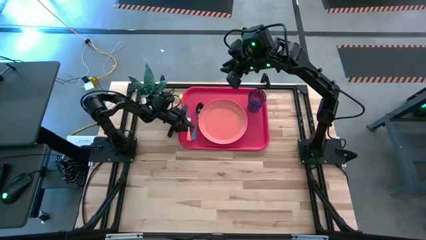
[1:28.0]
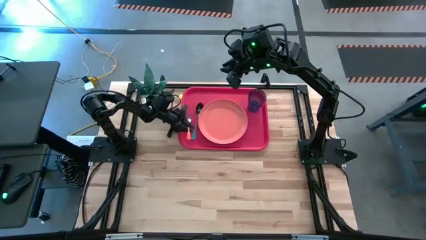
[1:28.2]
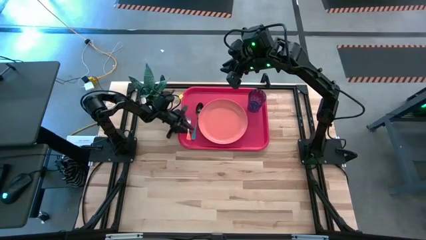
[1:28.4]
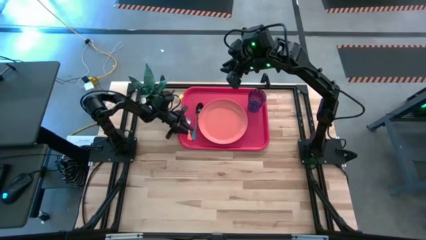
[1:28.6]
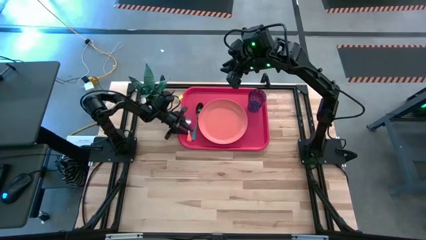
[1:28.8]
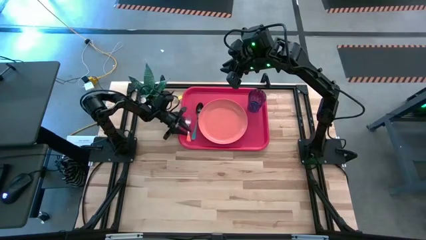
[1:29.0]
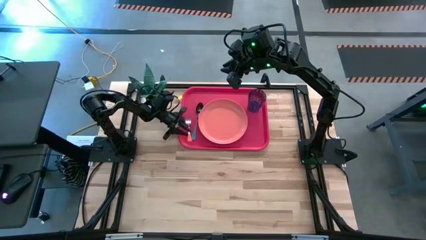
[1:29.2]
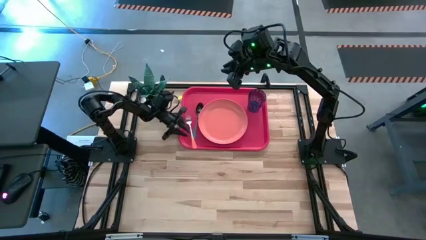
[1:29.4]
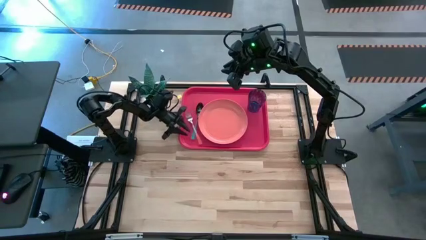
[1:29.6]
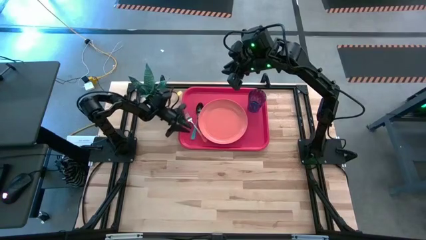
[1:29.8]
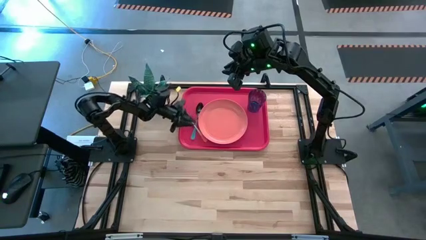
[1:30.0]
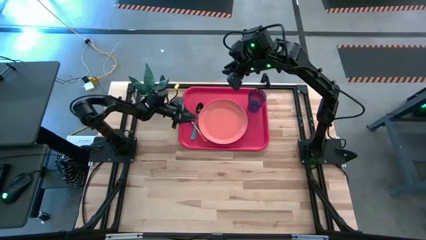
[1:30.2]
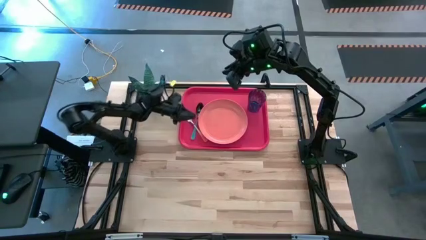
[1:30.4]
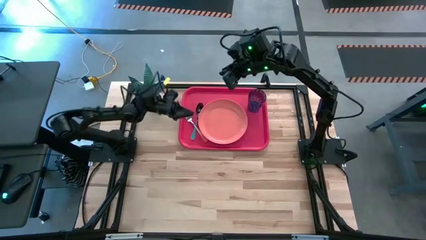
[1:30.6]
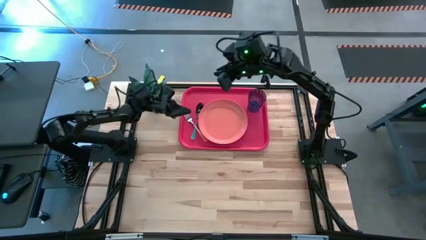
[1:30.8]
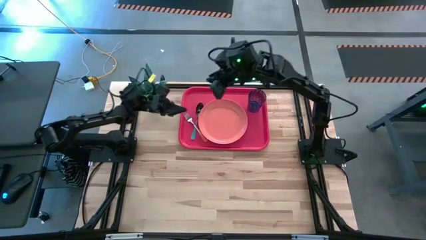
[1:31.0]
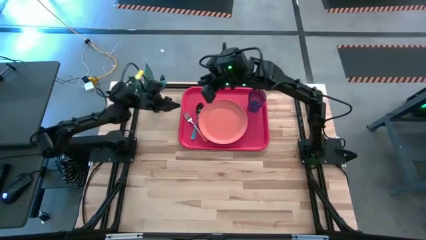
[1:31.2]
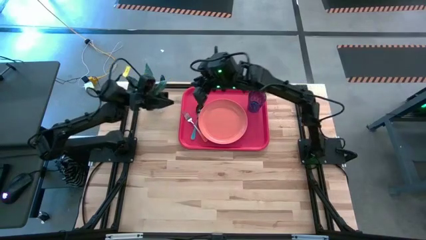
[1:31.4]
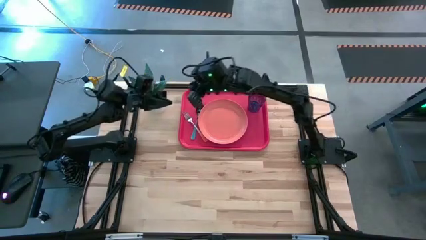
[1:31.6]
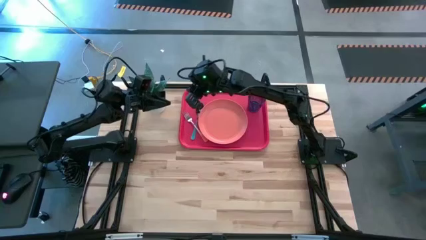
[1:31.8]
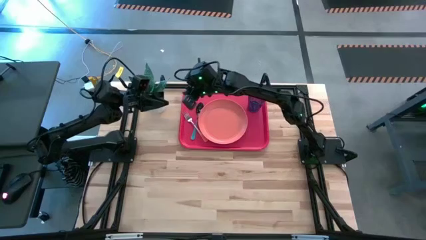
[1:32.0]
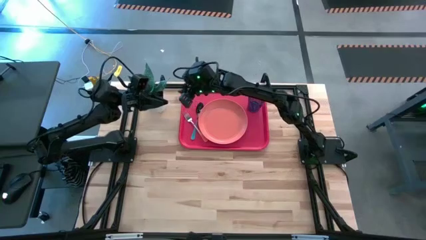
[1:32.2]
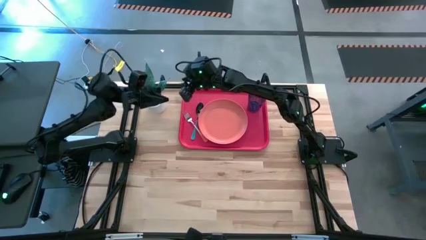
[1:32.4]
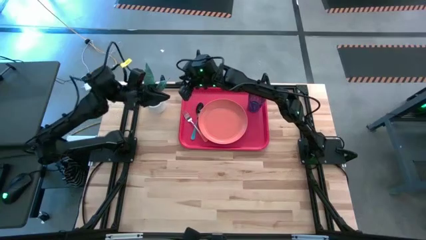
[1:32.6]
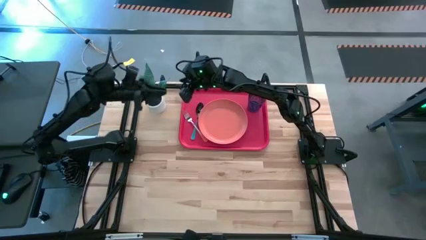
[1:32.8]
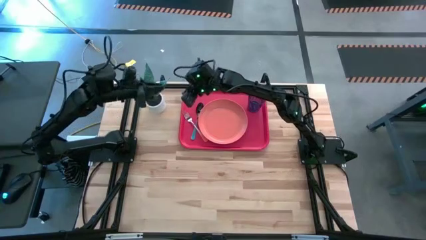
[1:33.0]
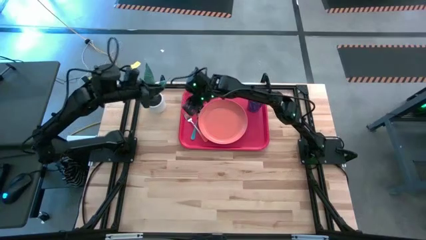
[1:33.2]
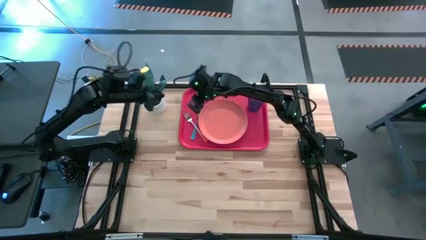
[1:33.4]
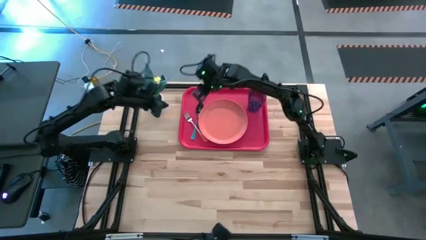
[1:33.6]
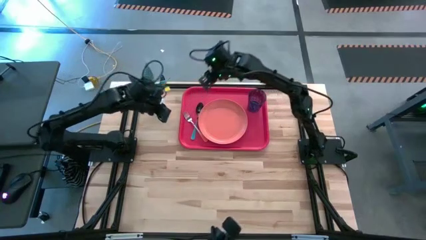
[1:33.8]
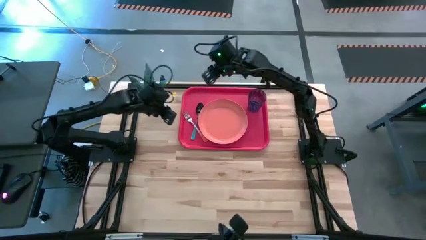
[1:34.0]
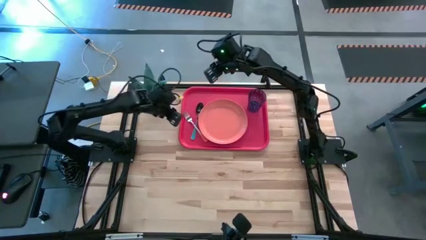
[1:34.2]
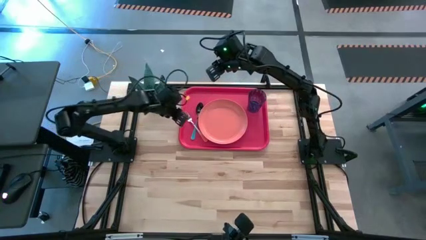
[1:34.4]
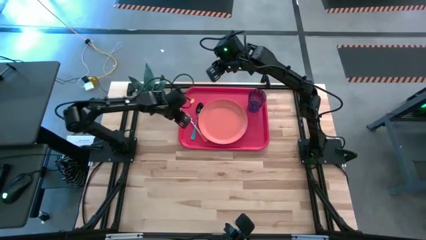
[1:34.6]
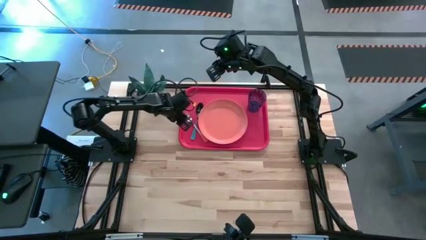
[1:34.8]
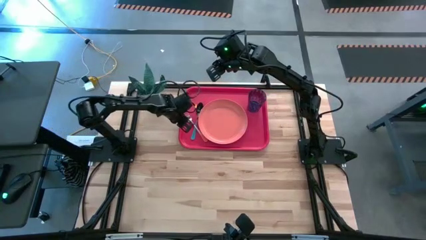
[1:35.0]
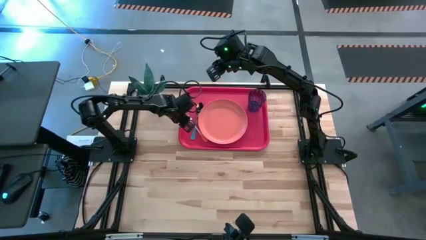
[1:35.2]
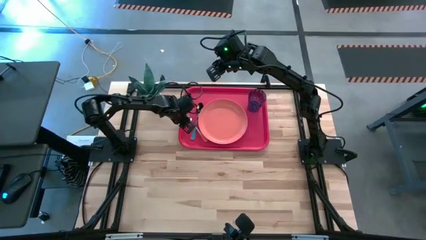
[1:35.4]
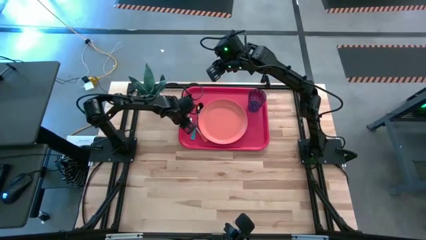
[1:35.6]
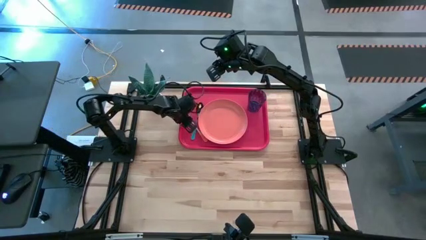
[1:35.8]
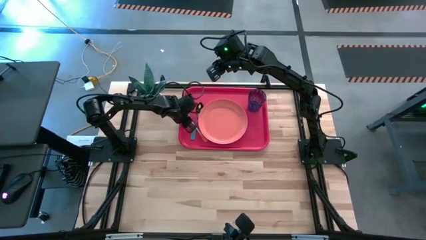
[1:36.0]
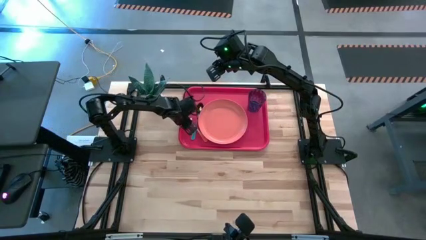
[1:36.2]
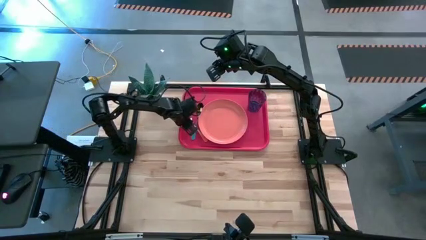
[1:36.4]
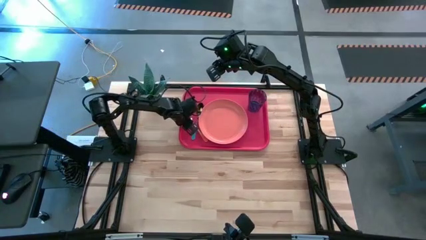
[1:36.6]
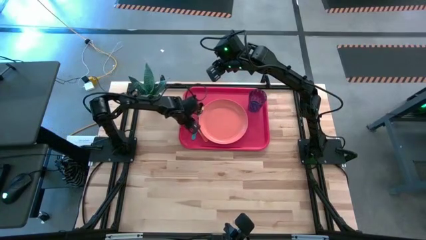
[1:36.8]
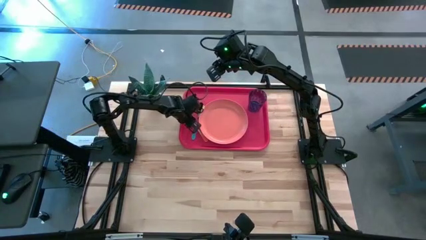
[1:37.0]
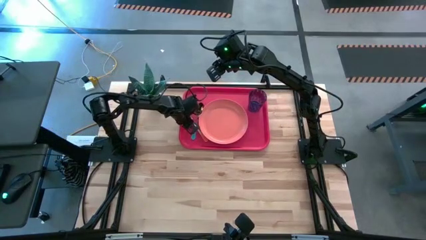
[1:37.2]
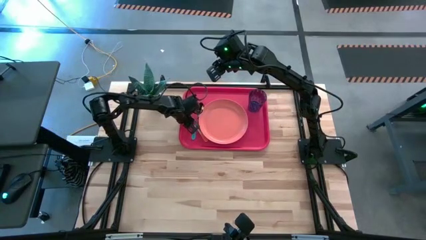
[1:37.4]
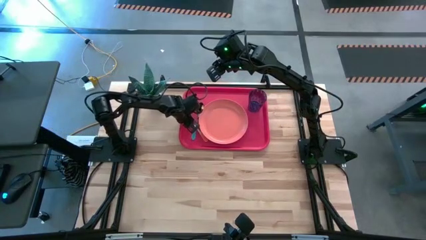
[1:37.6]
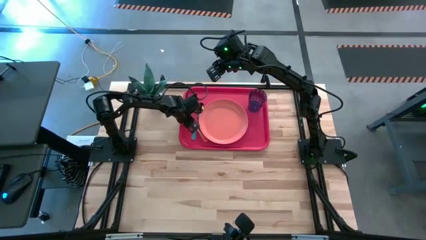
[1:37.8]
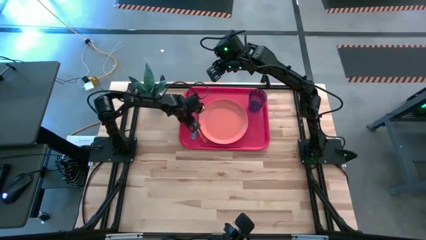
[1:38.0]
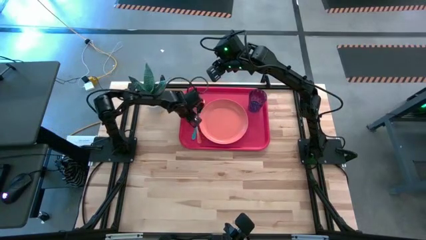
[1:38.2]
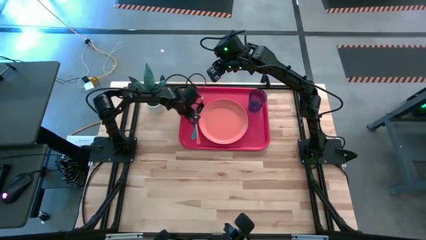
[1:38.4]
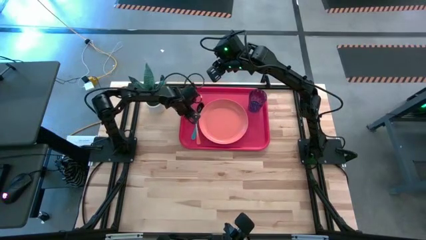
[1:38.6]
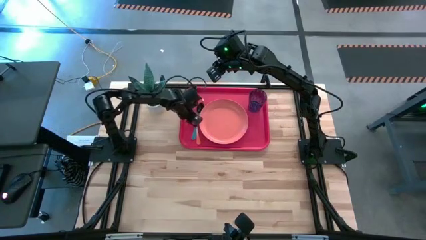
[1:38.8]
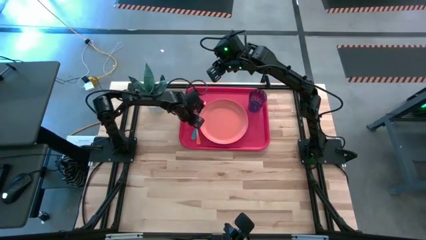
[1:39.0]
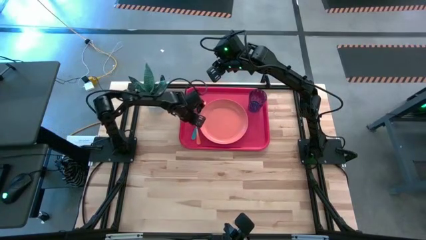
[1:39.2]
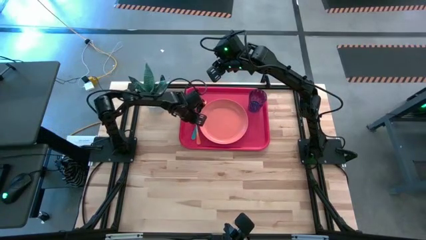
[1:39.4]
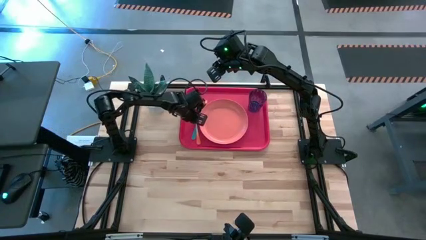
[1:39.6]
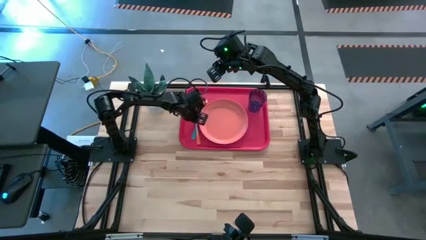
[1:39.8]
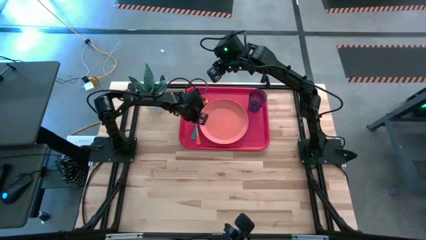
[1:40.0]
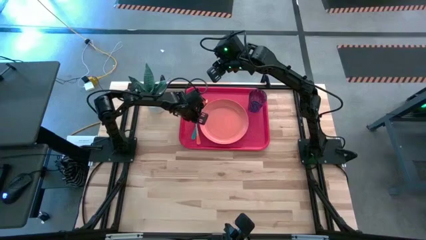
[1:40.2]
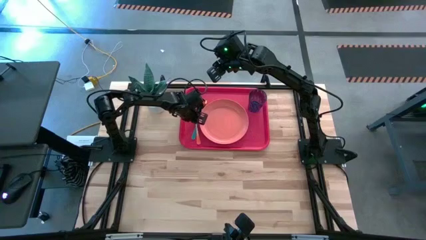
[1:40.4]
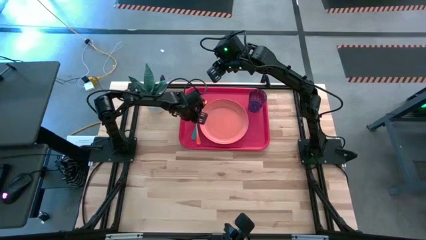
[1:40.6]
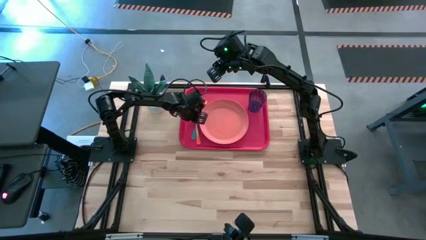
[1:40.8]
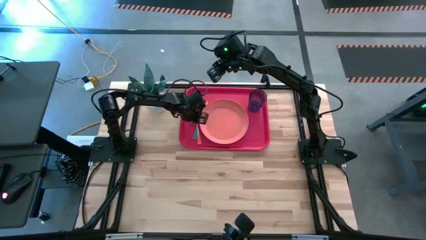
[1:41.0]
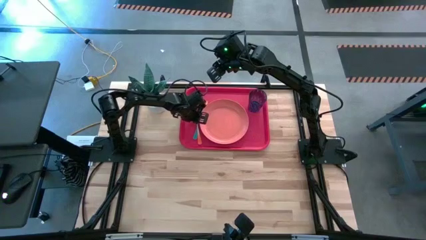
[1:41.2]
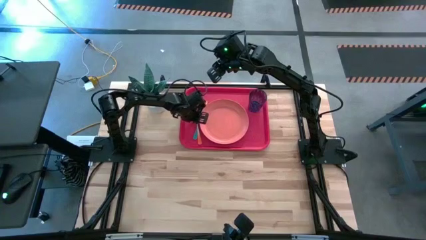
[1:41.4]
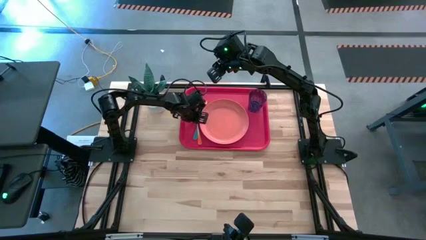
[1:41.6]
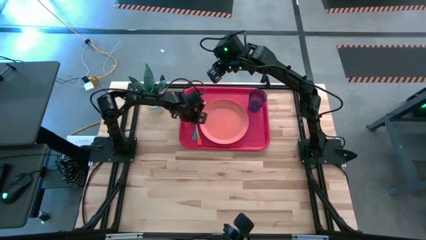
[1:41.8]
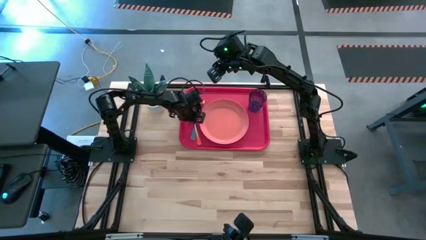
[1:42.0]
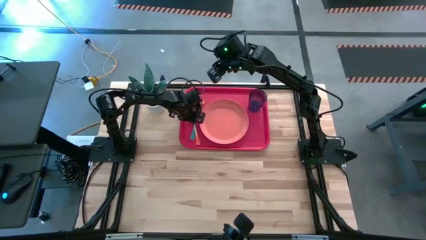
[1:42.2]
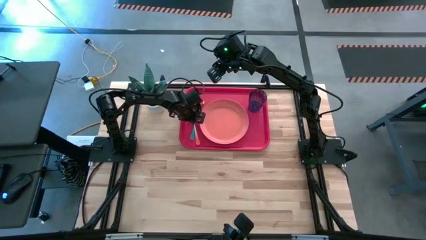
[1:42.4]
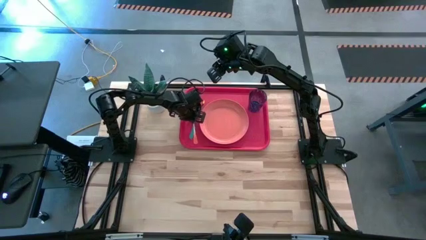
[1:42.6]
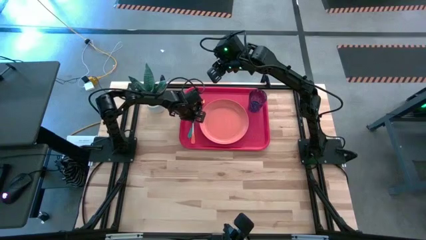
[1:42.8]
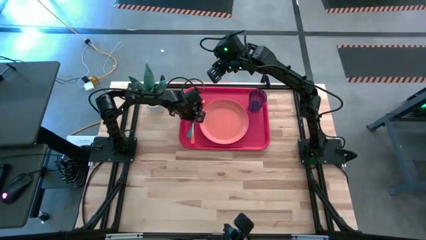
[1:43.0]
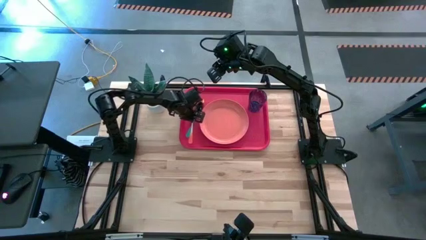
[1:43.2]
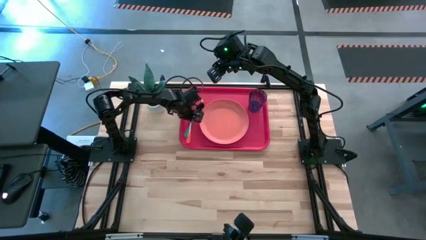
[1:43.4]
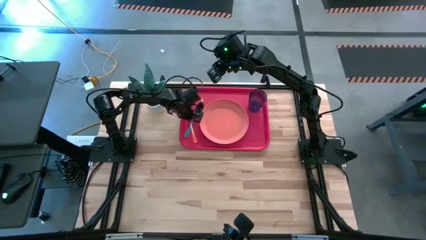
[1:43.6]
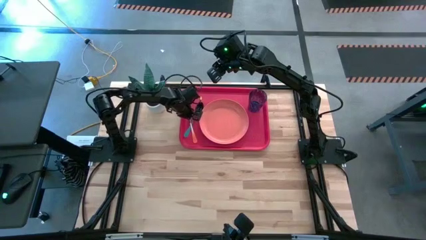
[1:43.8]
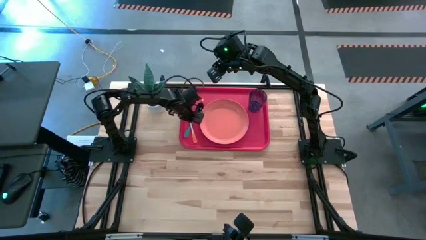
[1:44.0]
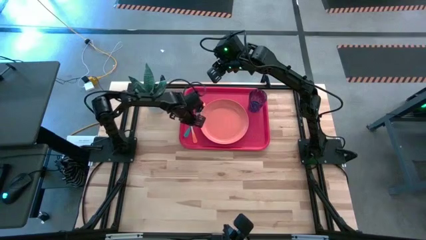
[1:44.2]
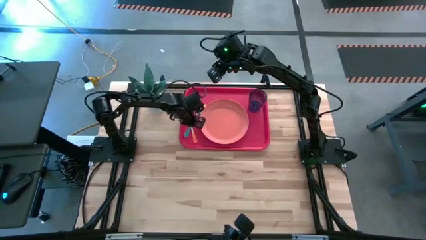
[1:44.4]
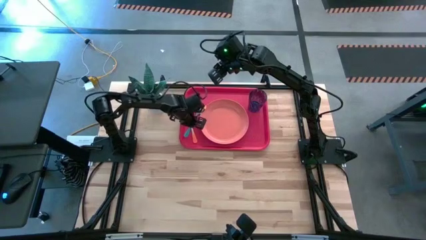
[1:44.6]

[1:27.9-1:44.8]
Task: Pick and place plate/cup/fork/spoon on tray
Adjust the utensils on the pink tray
